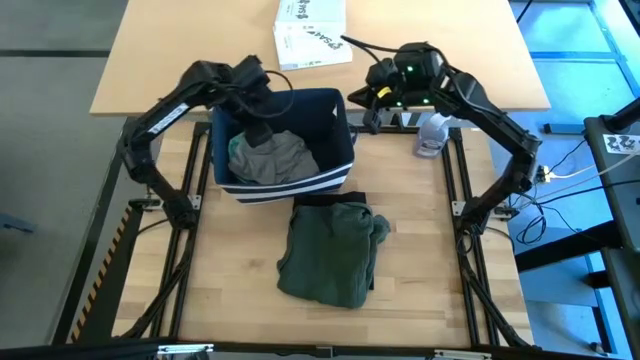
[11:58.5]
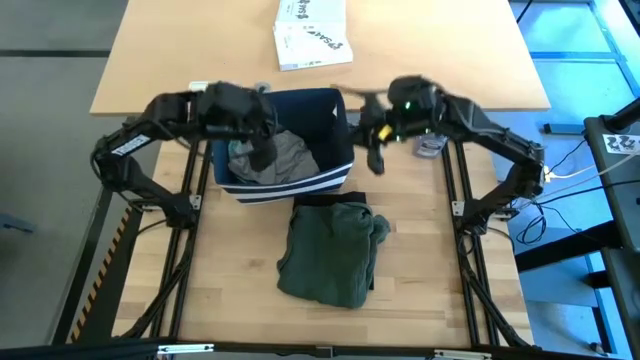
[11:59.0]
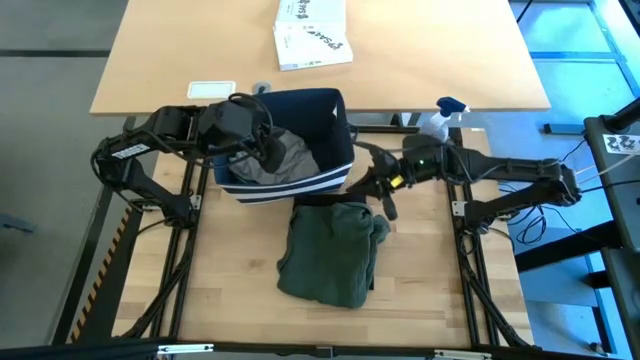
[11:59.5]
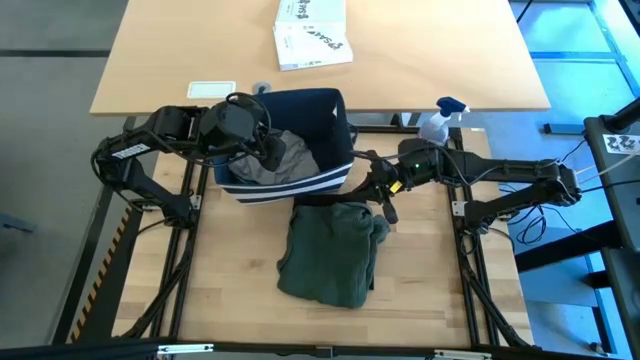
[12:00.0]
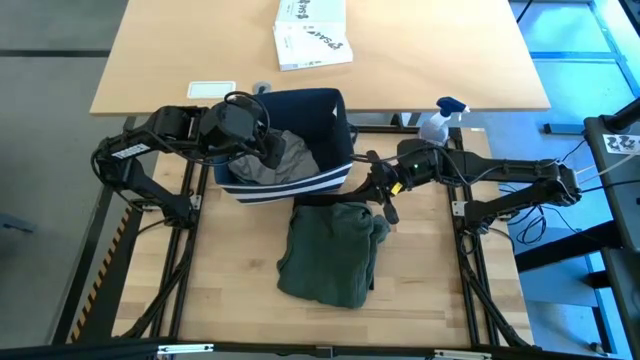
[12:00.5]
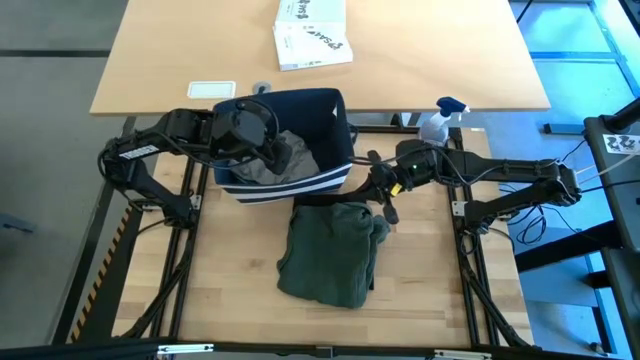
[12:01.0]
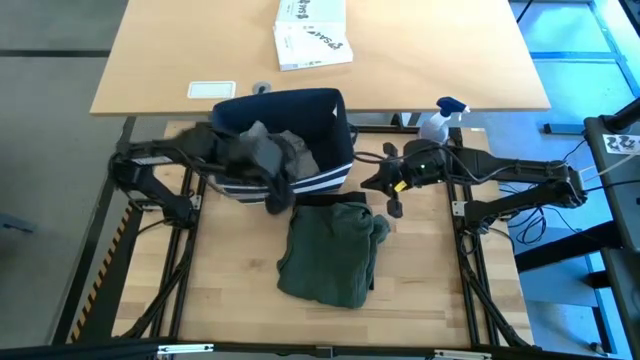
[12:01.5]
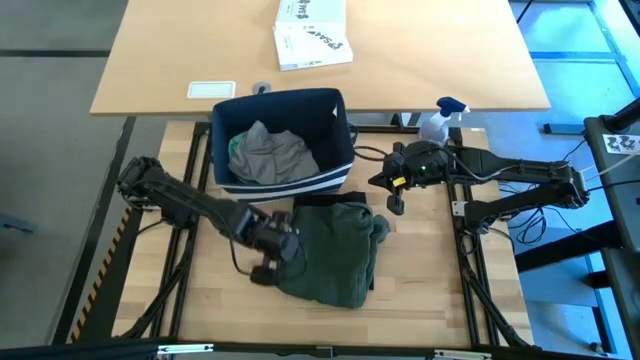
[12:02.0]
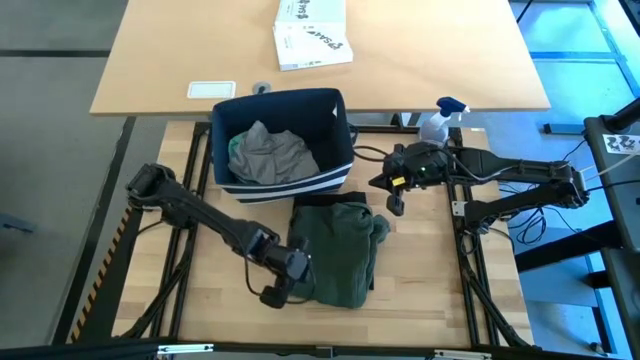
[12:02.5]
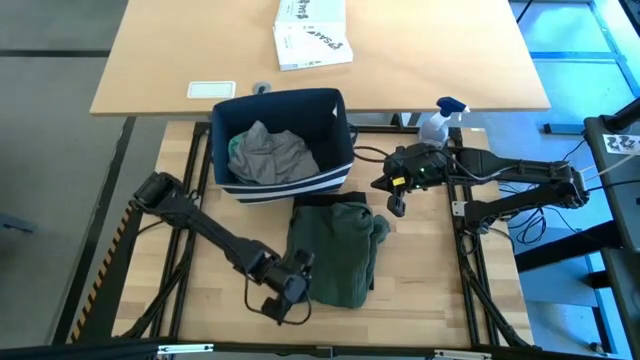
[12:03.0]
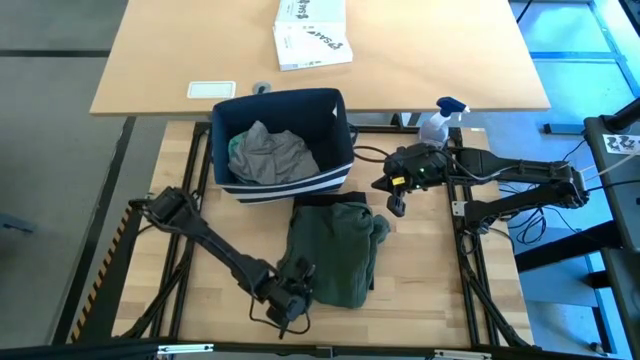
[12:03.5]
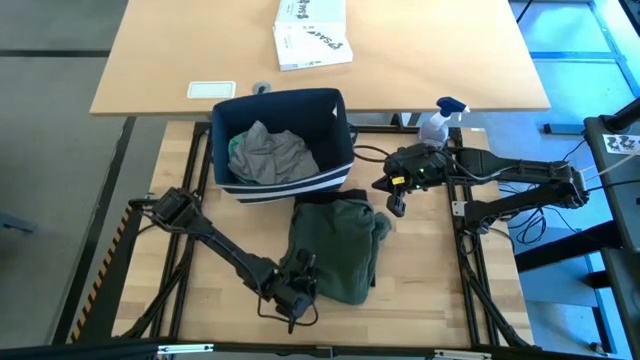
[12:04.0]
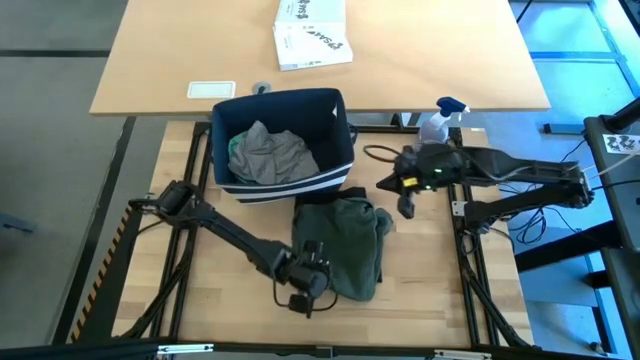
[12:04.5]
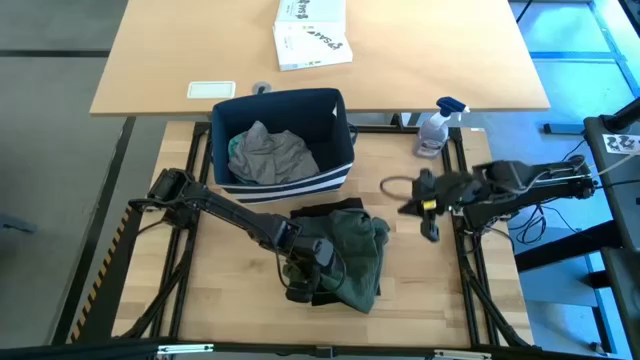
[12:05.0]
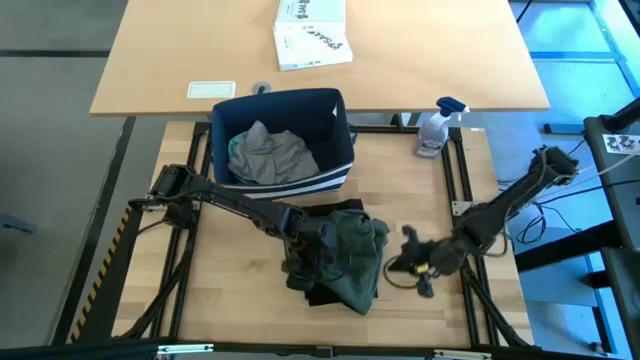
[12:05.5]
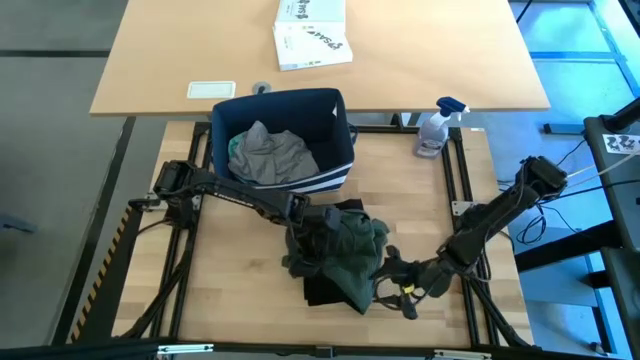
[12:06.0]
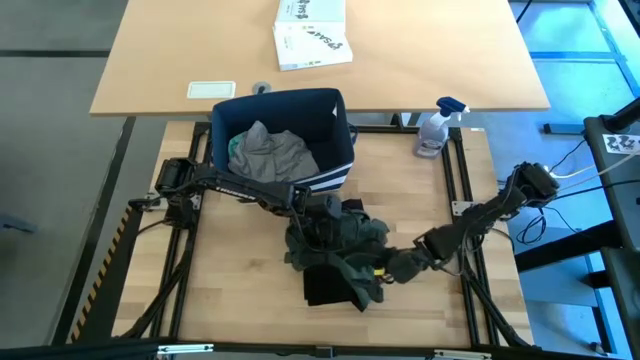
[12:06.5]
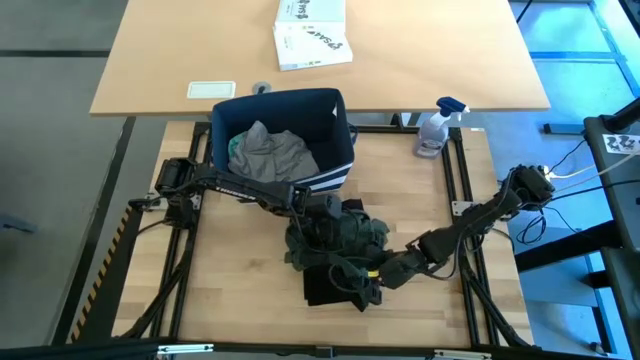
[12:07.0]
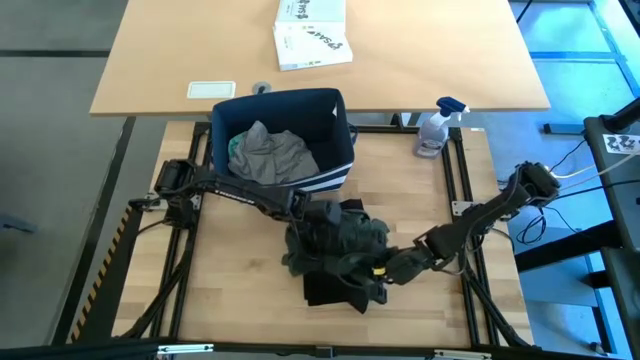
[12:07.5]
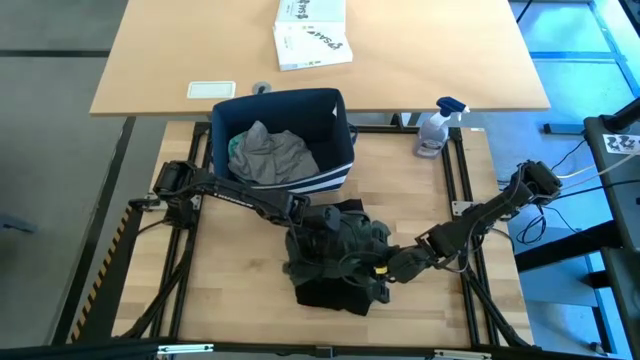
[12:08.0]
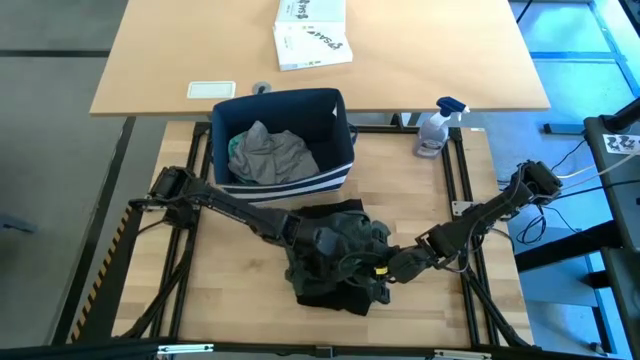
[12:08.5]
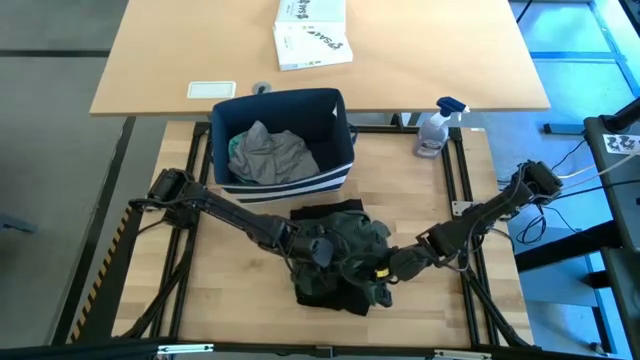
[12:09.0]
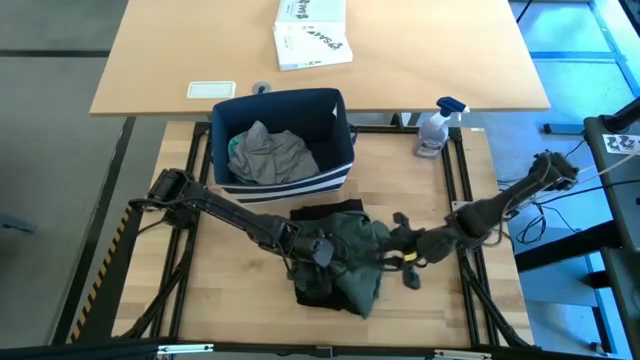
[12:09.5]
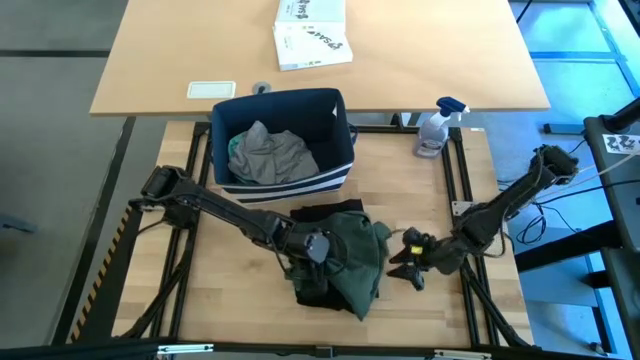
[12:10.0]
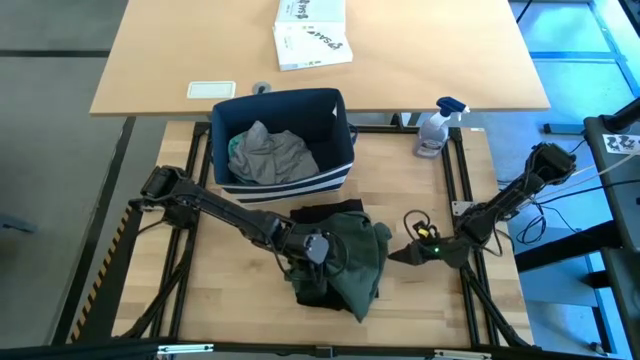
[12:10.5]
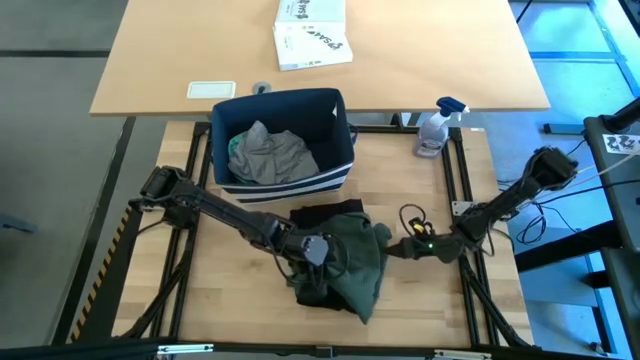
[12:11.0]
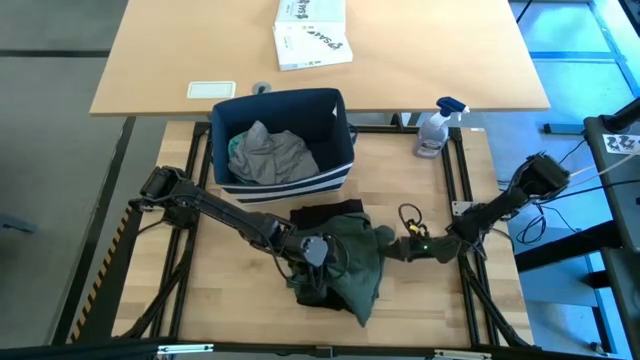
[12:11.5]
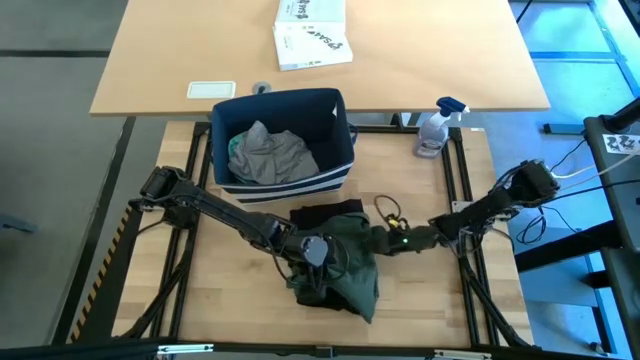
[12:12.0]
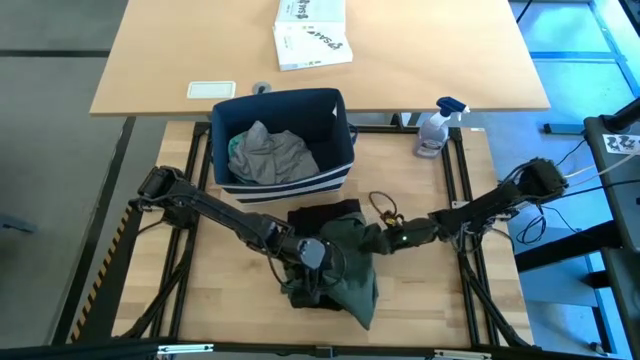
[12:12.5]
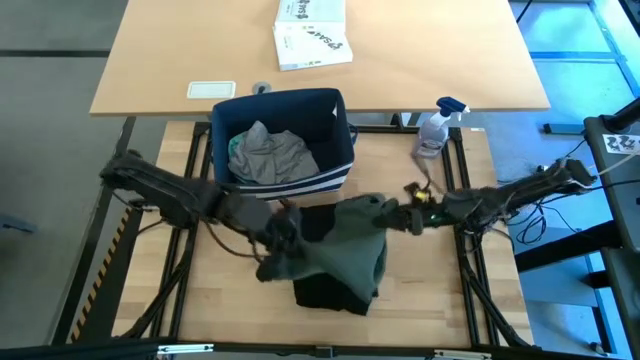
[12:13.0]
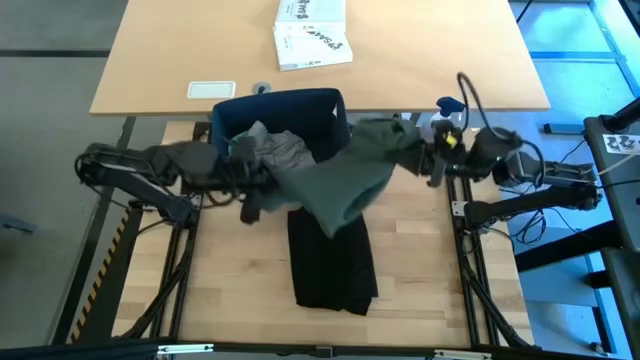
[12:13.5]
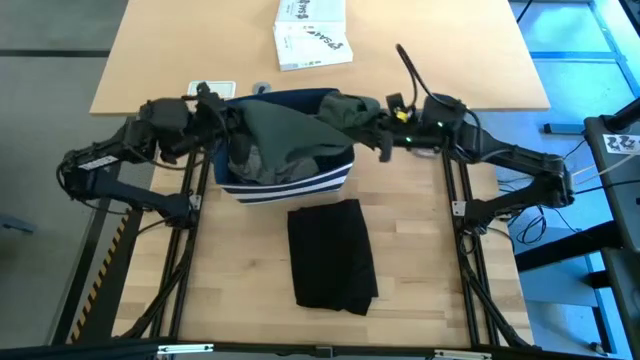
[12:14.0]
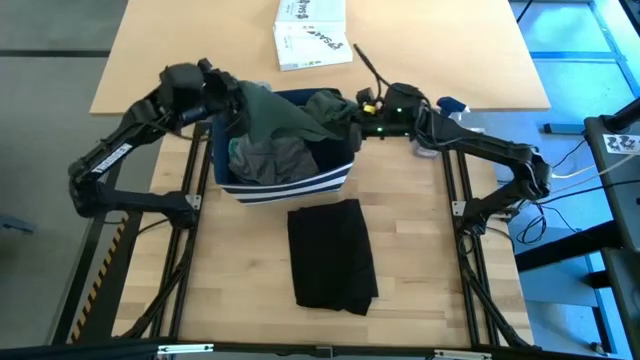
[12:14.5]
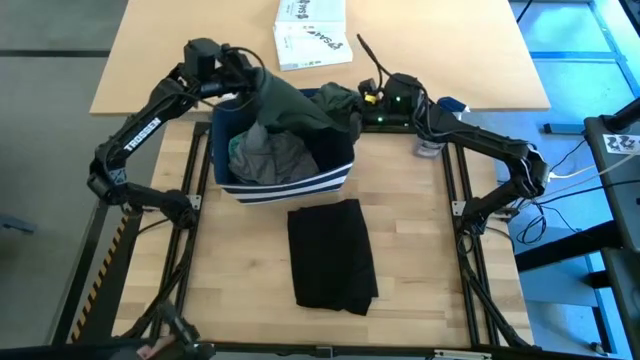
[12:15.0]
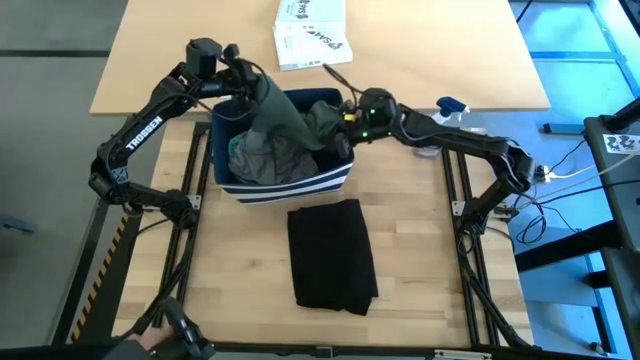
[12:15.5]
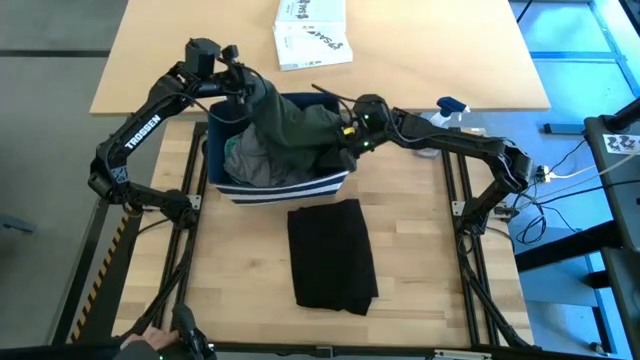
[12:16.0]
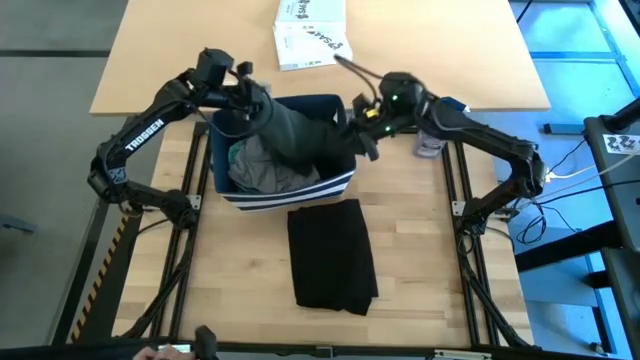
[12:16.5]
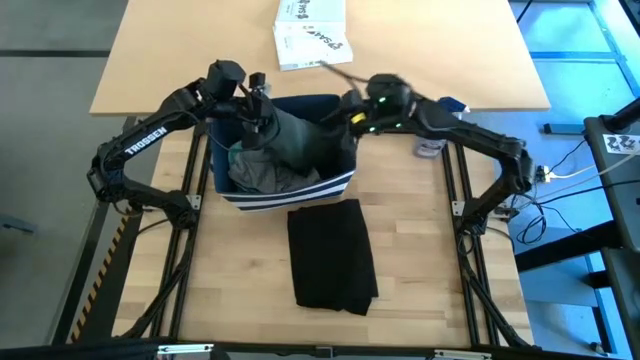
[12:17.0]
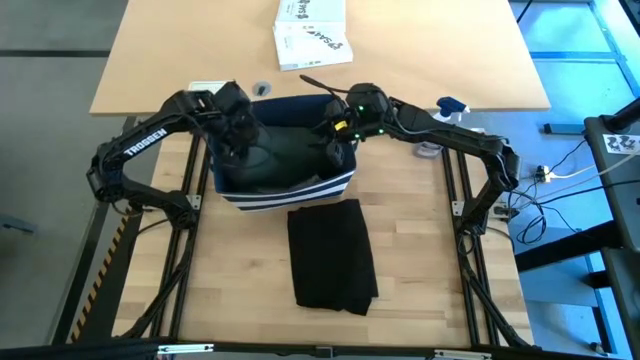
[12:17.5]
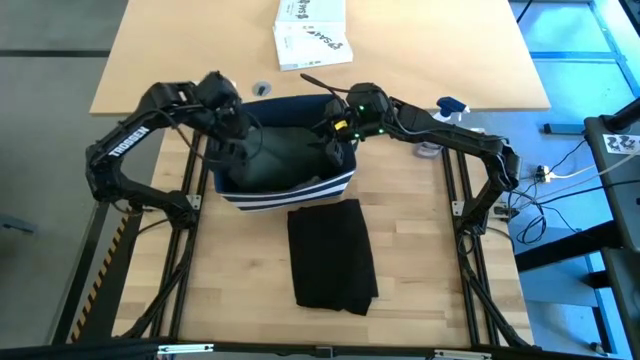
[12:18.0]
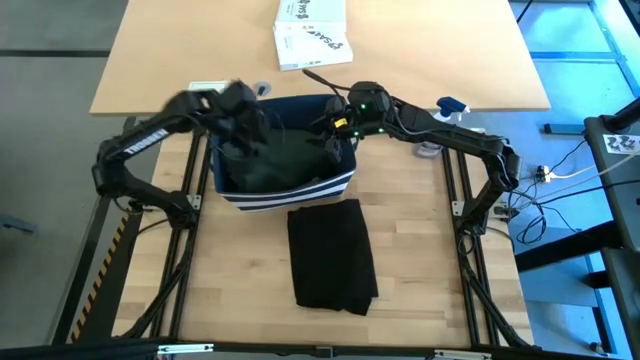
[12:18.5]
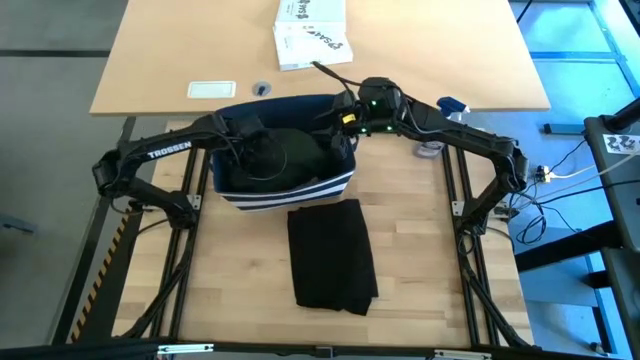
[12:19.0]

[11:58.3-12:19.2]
Task: Fold Laundry from Bin
Put the folded green polo shirt into the blue bin
